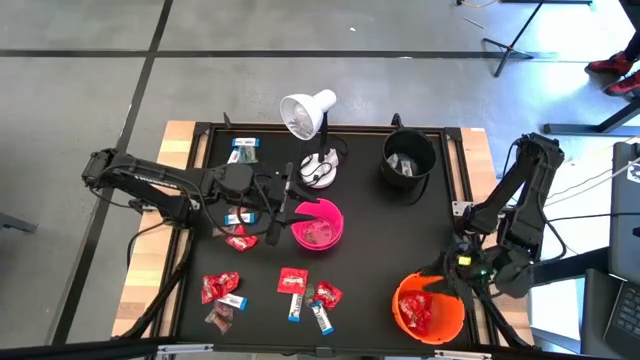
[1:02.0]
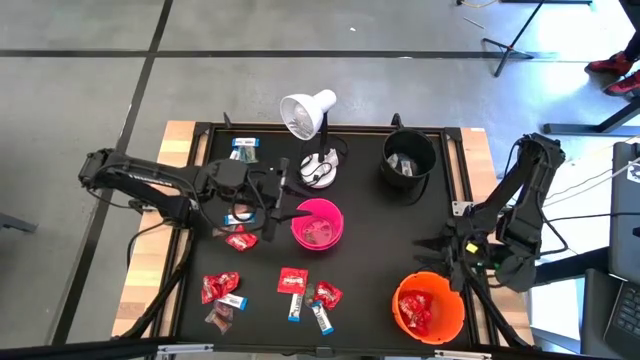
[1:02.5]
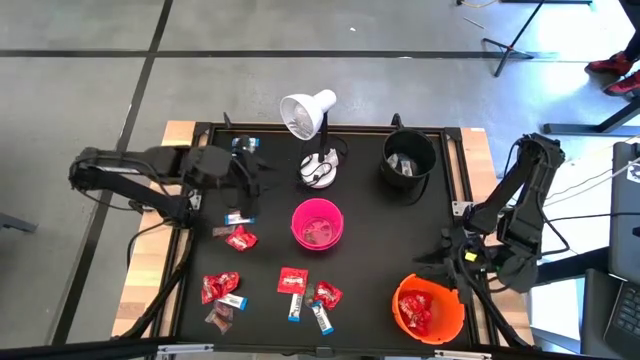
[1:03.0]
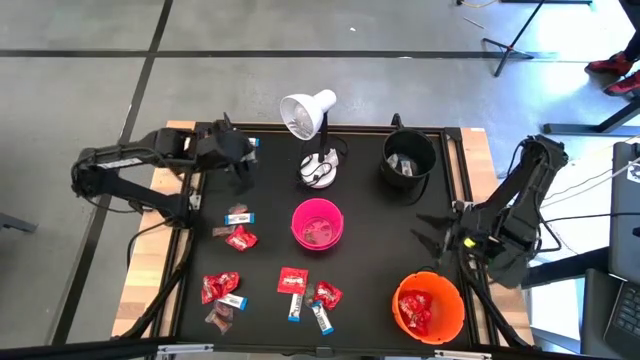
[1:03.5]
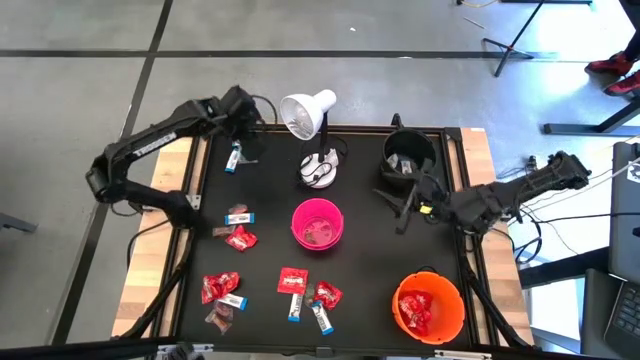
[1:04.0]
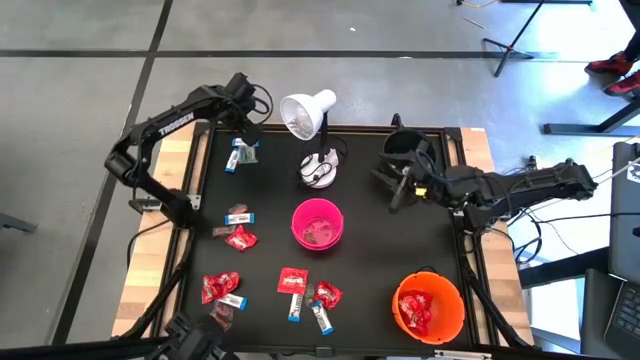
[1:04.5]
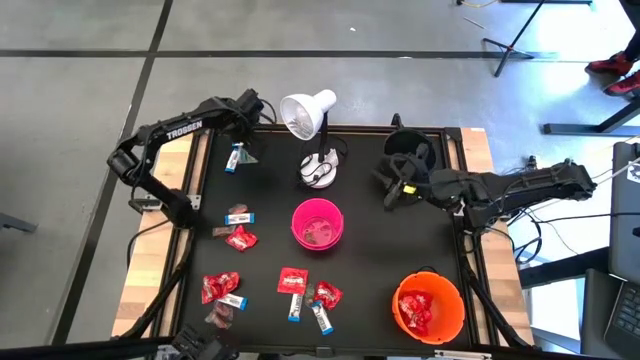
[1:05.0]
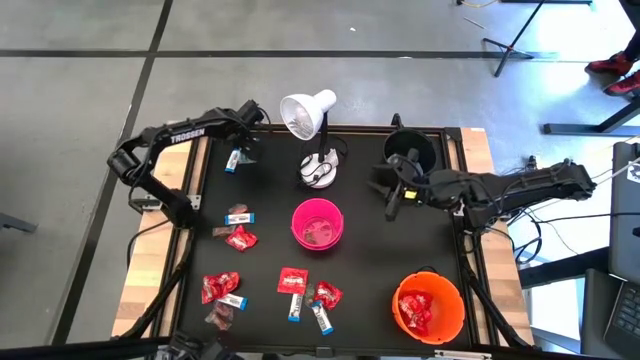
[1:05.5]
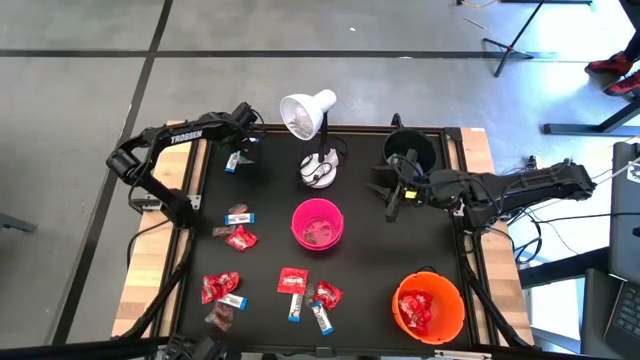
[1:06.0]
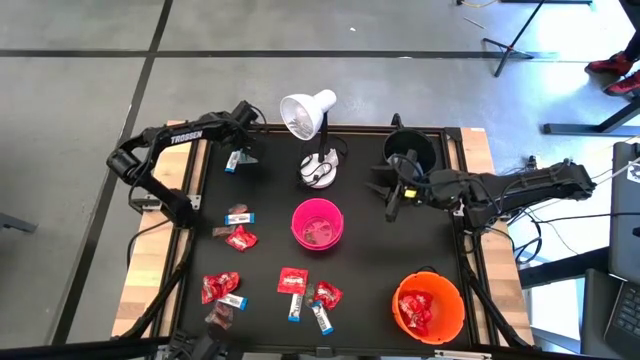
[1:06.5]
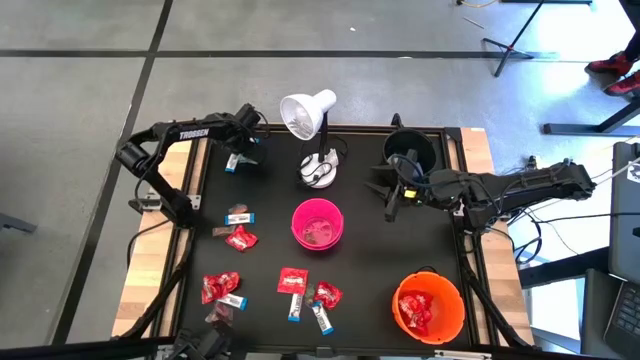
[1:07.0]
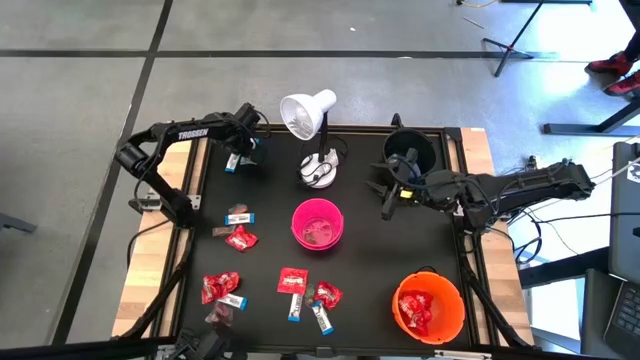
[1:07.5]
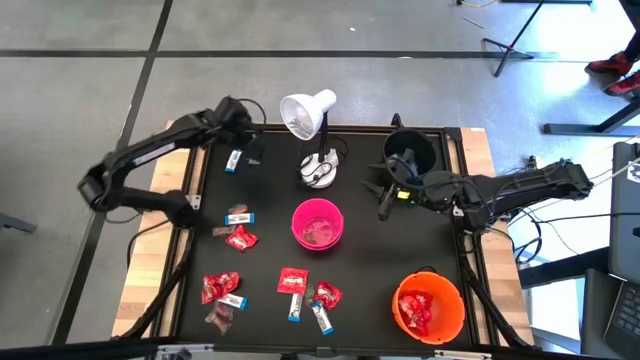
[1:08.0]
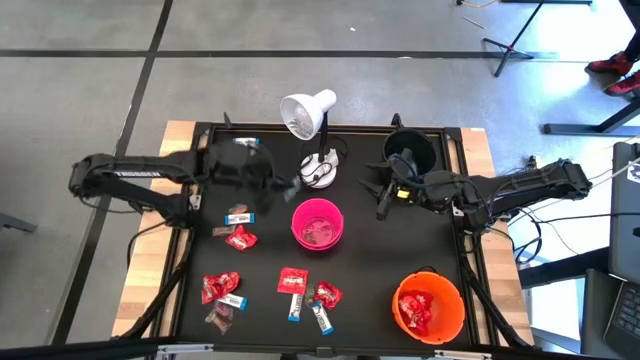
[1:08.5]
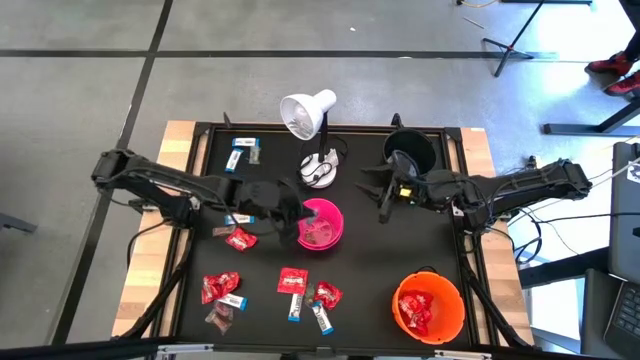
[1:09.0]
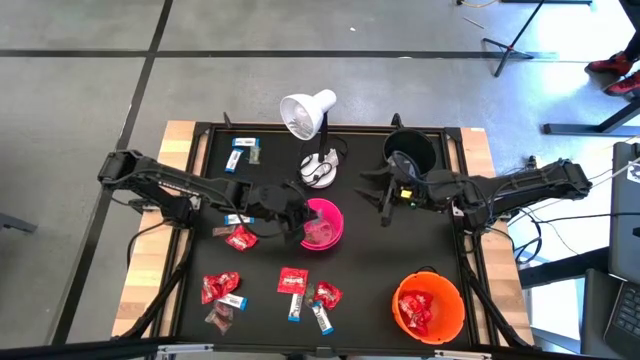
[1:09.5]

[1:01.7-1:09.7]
Task: Sort candy
Put the blue gummy into the pink bucket

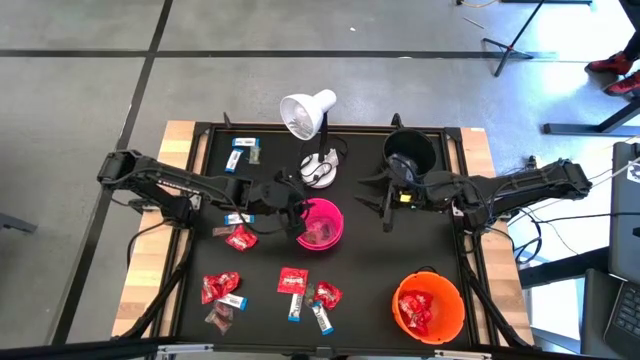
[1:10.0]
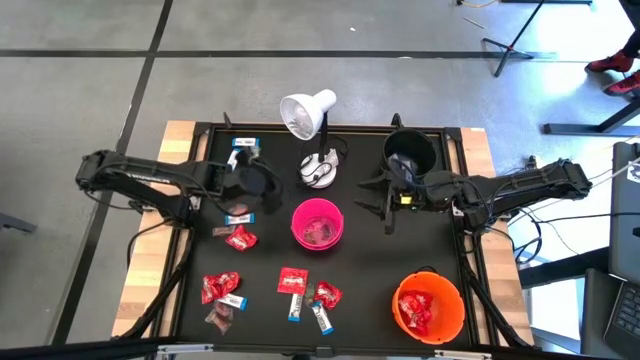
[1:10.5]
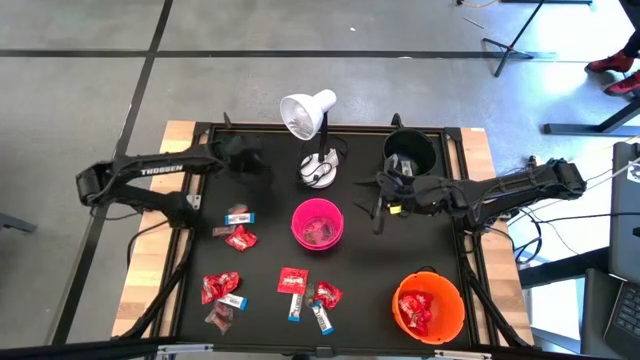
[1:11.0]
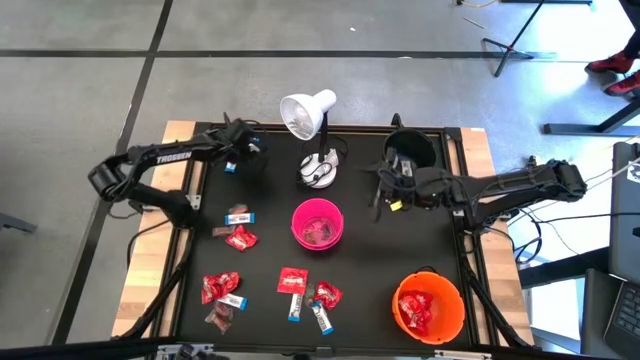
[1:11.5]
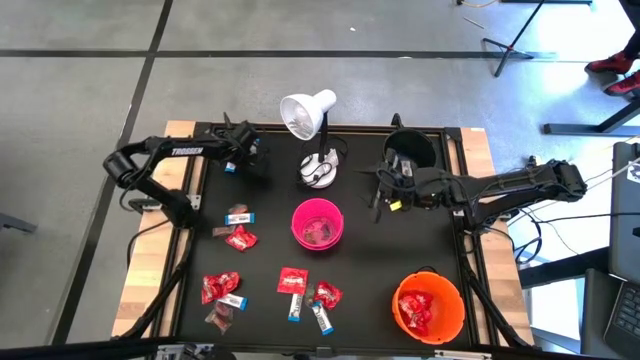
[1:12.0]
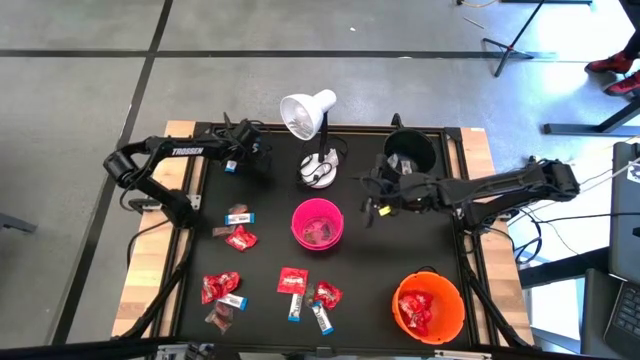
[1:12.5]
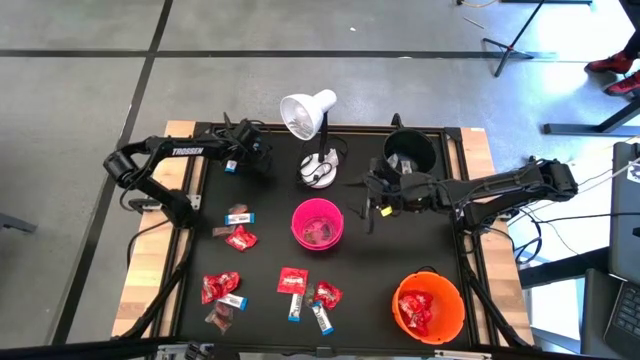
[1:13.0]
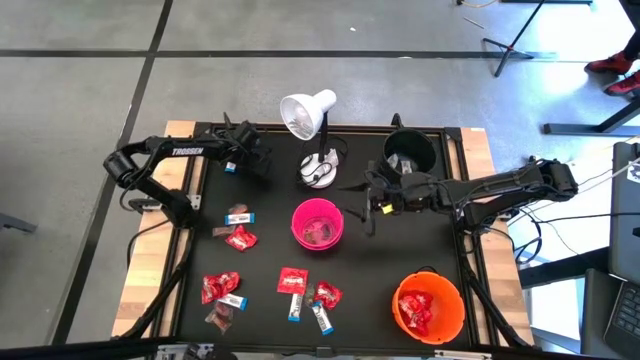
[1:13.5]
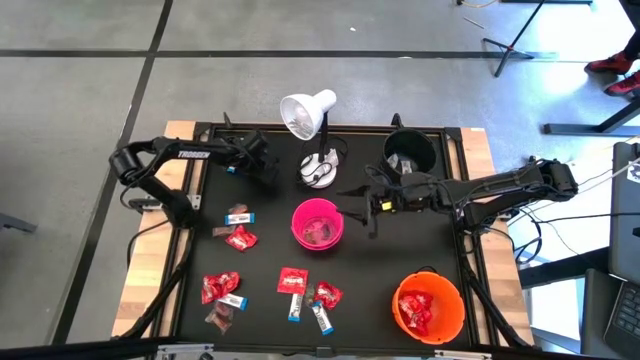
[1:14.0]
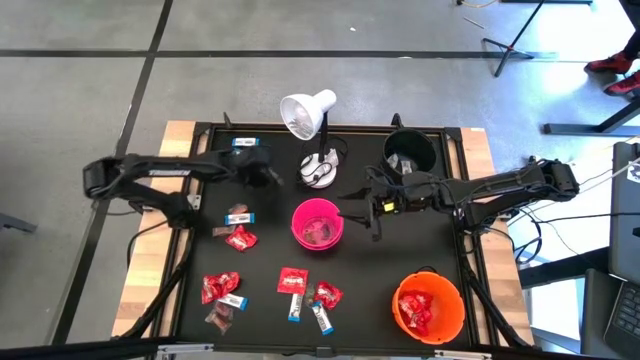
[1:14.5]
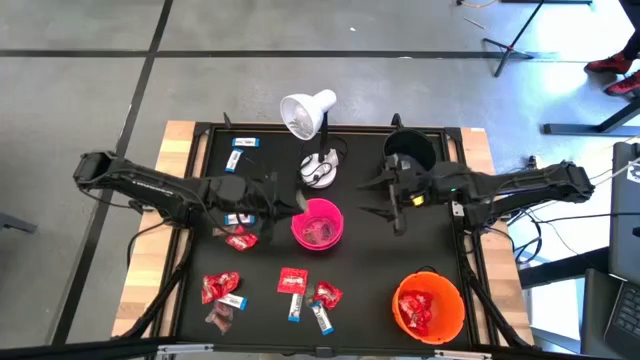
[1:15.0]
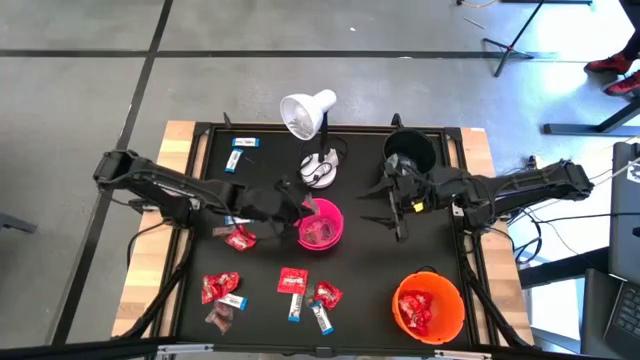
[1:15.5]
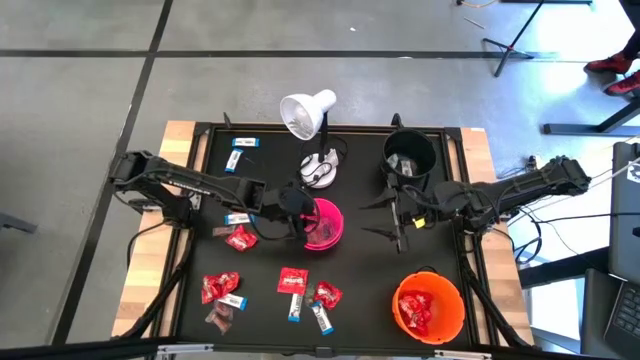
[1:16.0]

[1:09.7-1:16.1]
Put the green gummy into the pink bucket

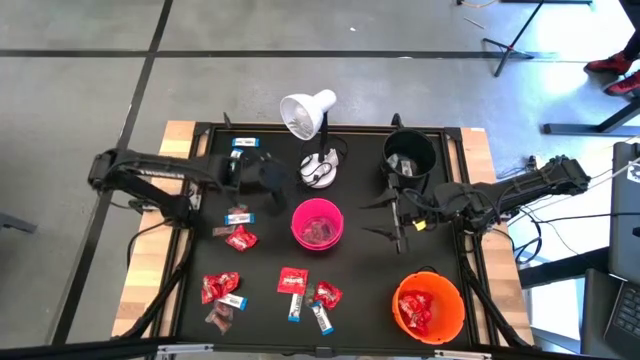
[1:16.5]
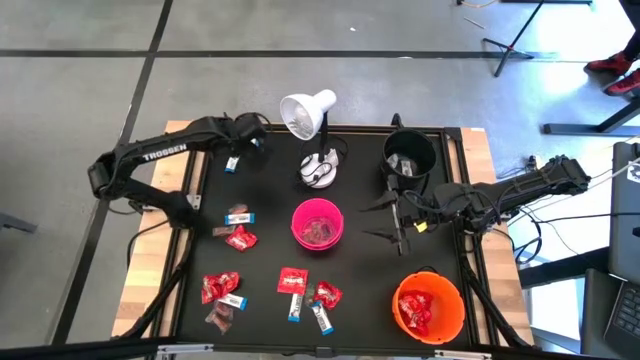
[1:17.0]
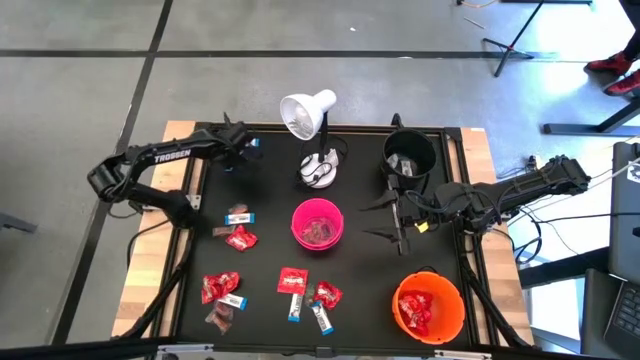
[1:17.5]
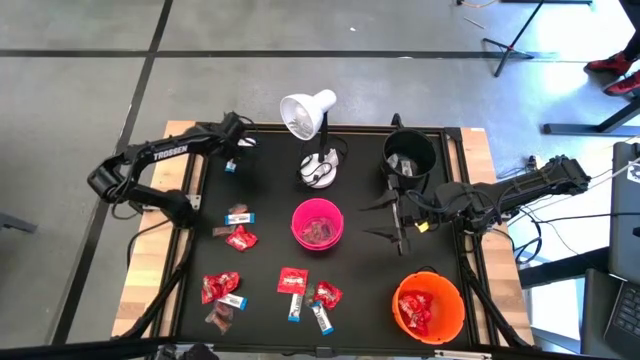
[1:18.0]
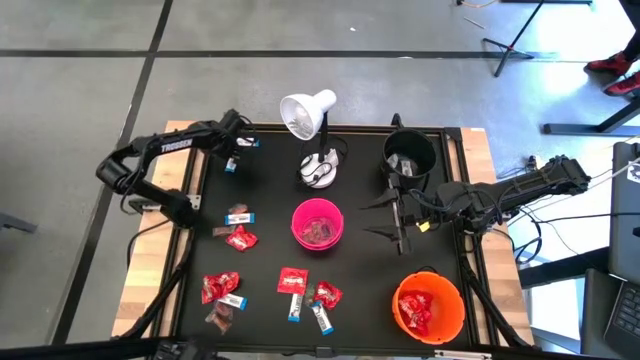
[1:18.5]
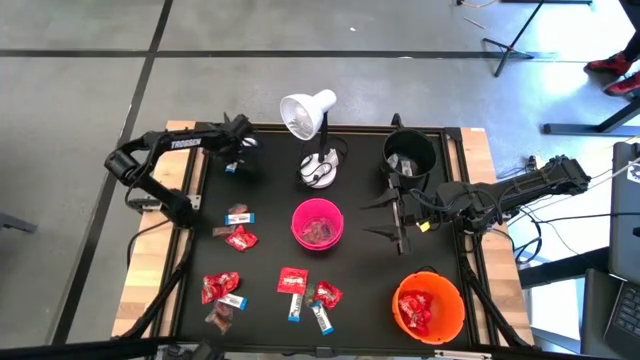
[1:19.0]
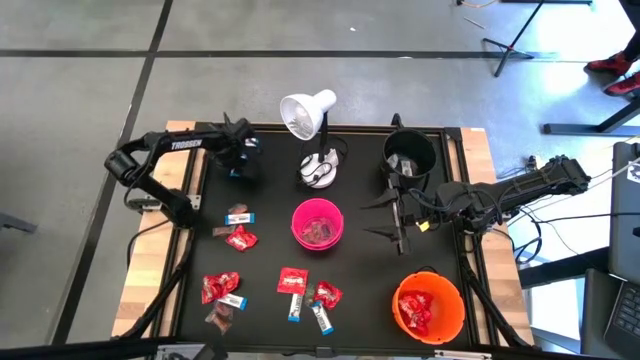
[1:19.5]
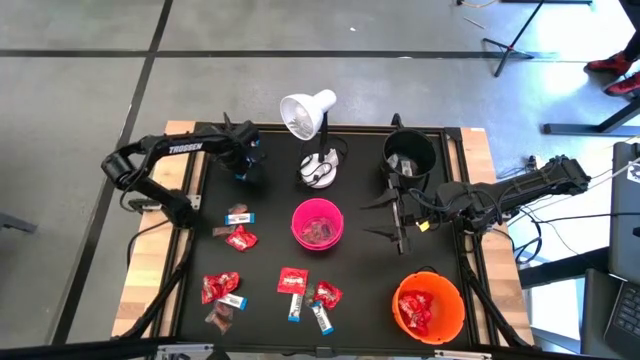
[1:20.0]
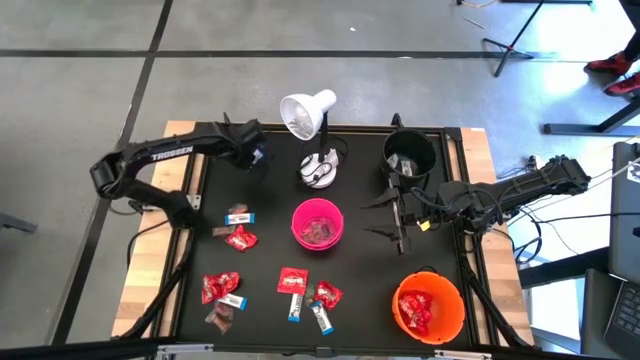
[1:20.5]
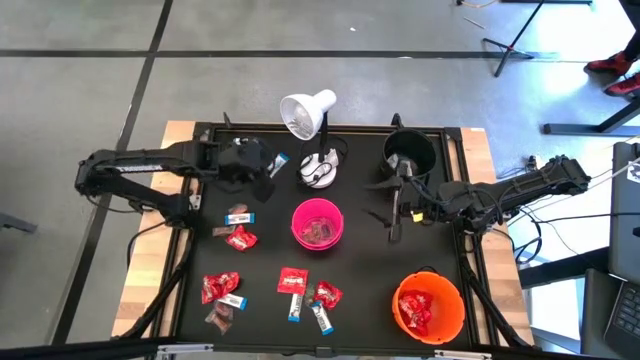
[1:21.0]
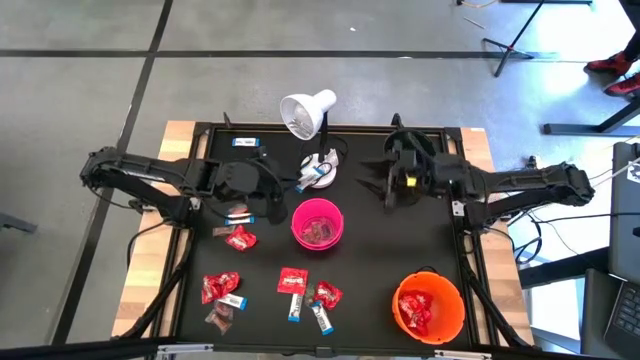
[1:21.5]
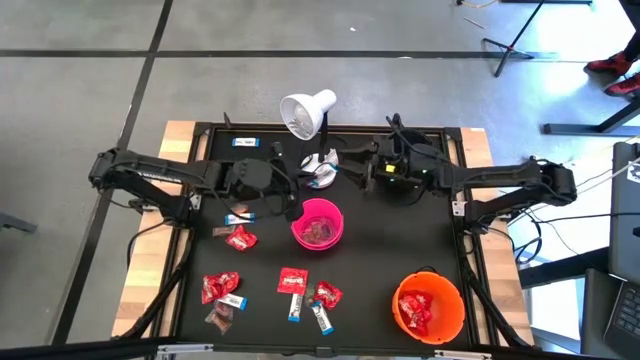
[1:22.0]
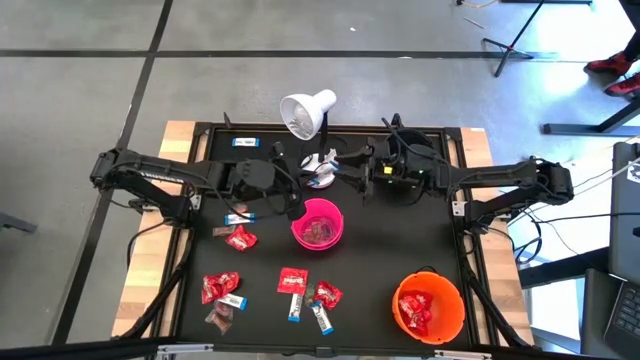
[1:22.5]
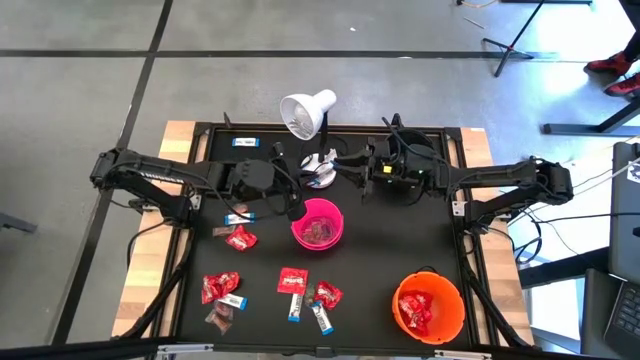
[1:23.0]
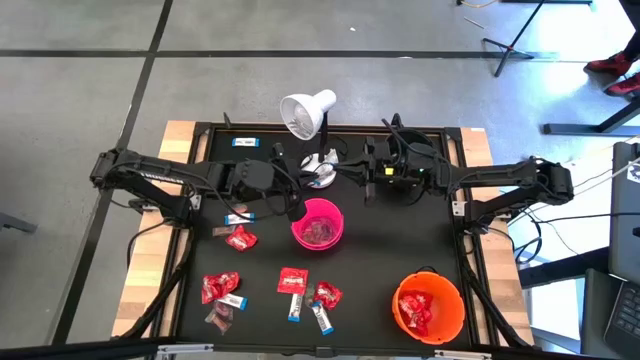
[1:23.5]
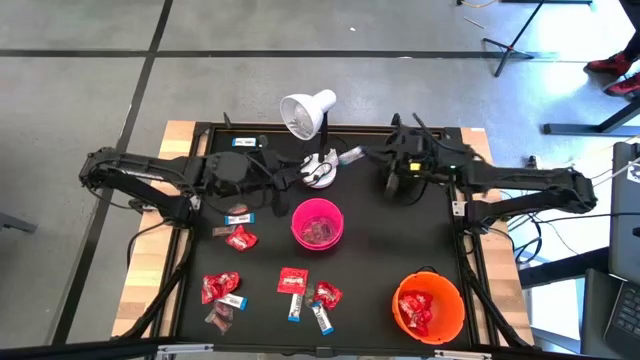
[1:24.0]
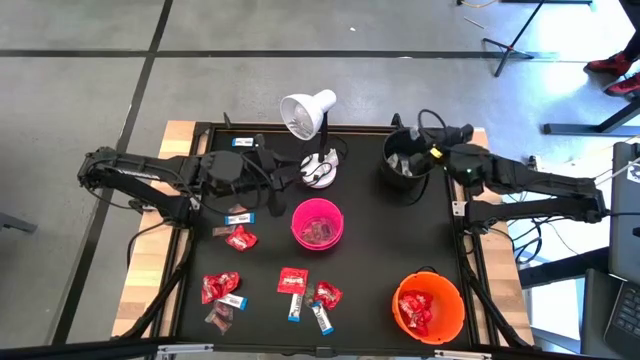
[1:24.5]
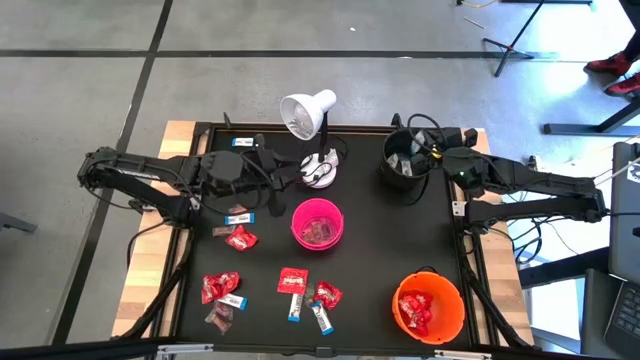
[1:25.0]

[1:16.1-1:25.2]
Put the white chocolate bar into the black bucket
